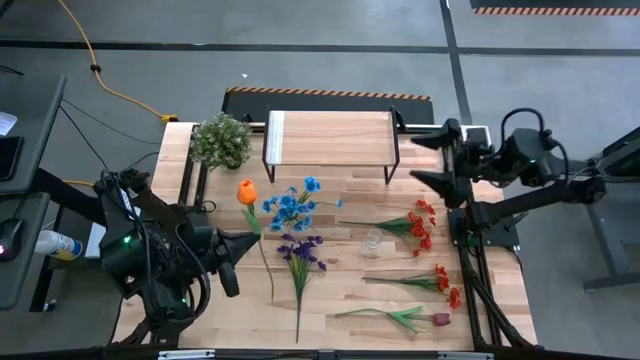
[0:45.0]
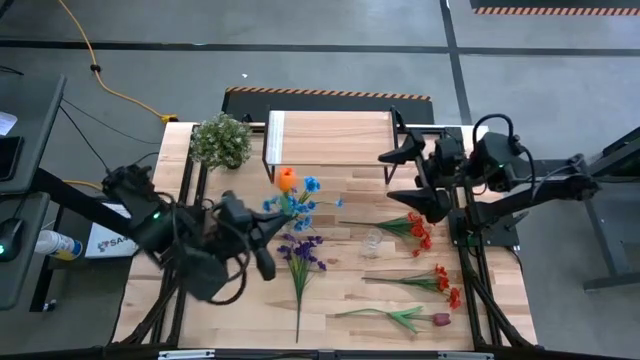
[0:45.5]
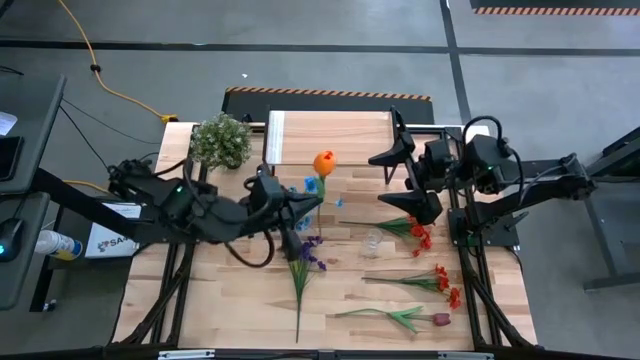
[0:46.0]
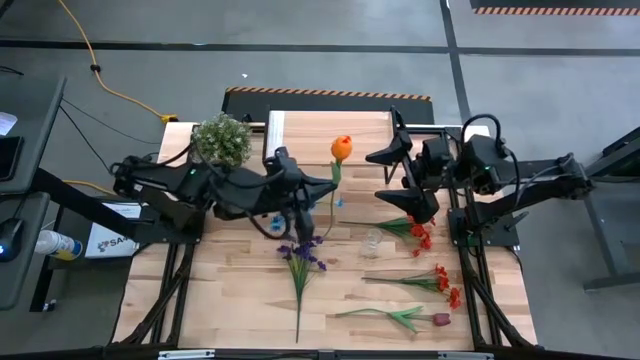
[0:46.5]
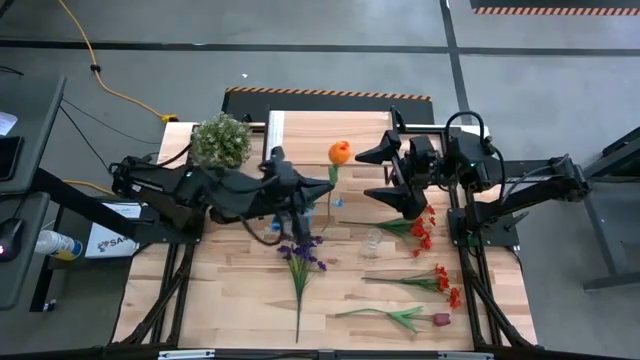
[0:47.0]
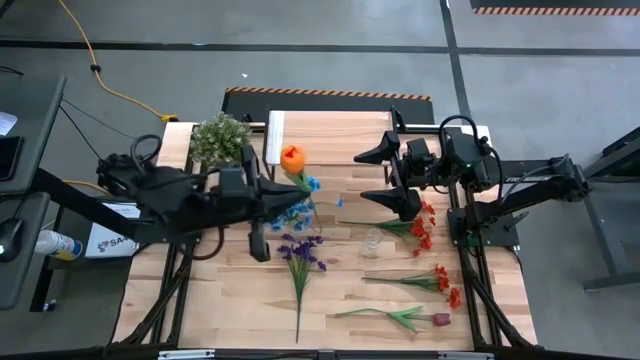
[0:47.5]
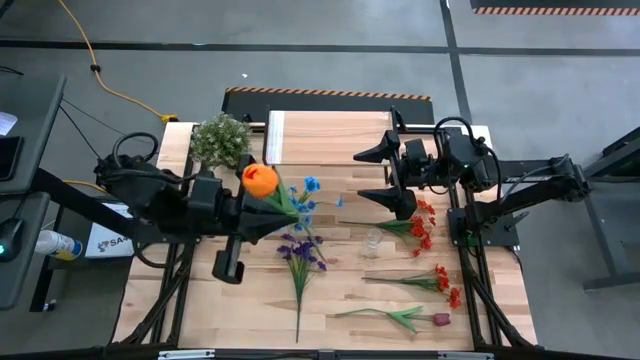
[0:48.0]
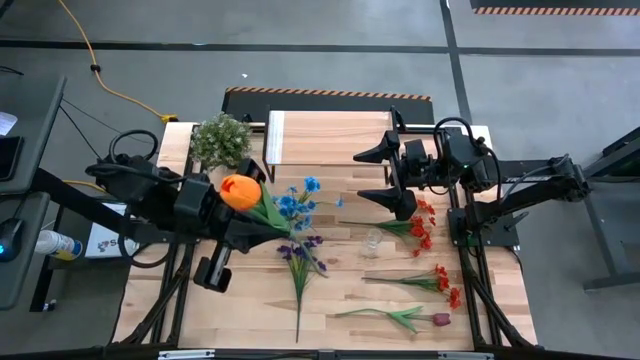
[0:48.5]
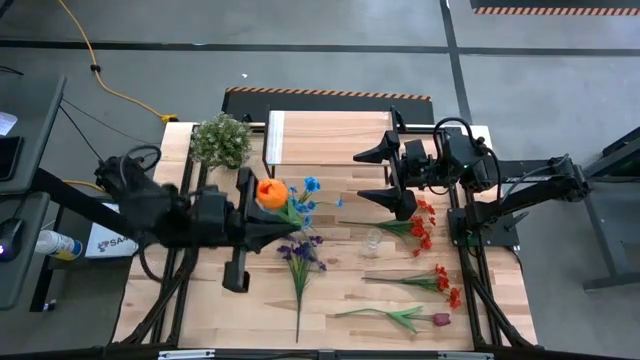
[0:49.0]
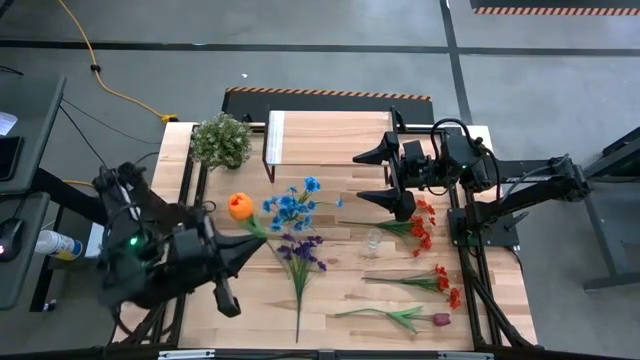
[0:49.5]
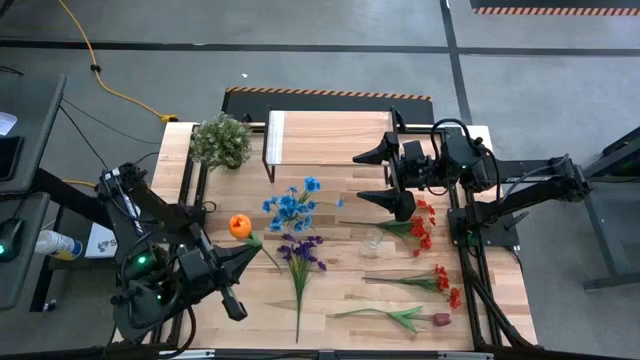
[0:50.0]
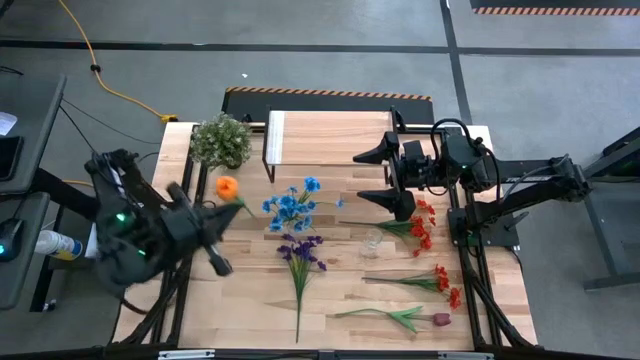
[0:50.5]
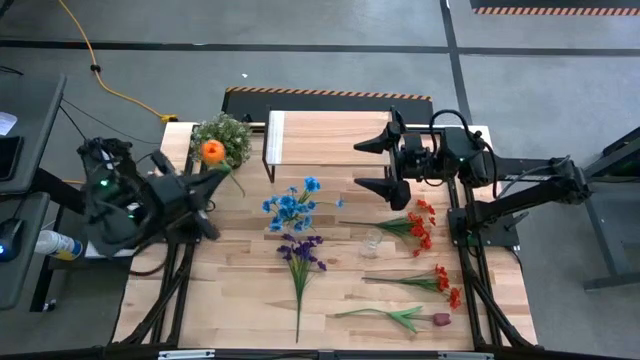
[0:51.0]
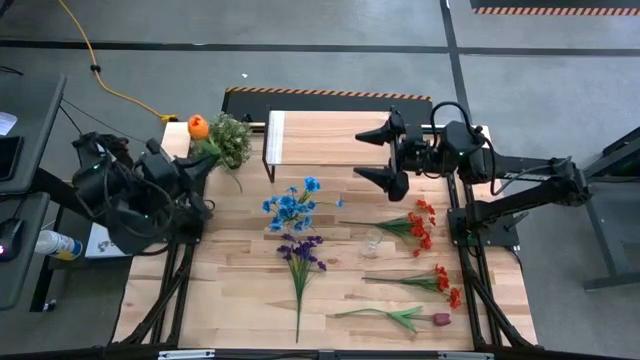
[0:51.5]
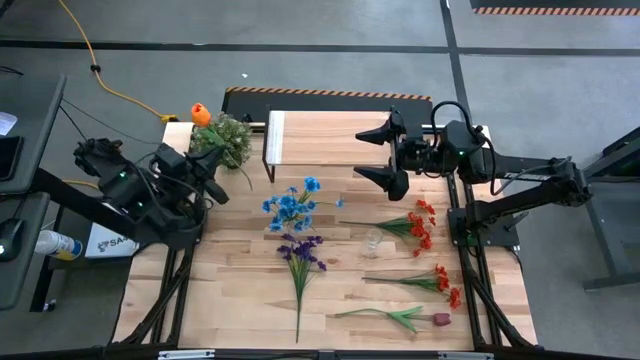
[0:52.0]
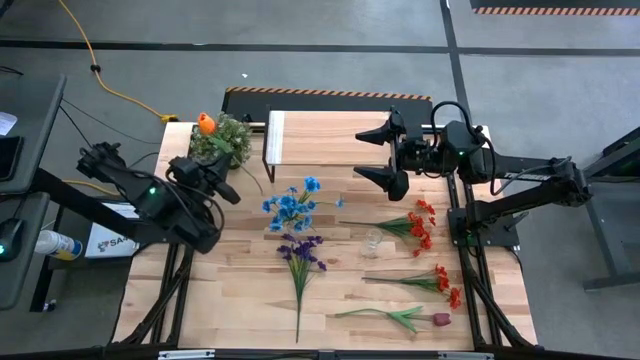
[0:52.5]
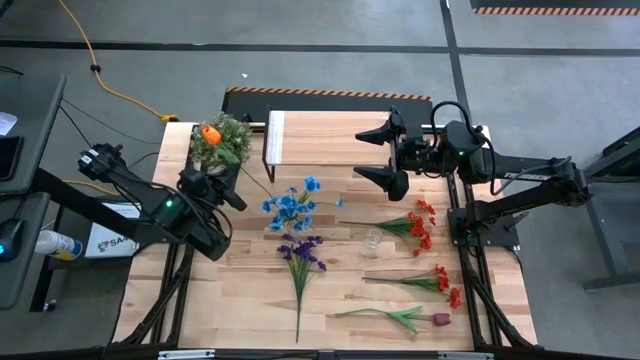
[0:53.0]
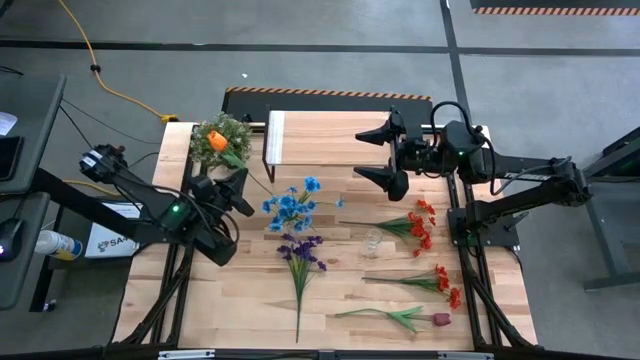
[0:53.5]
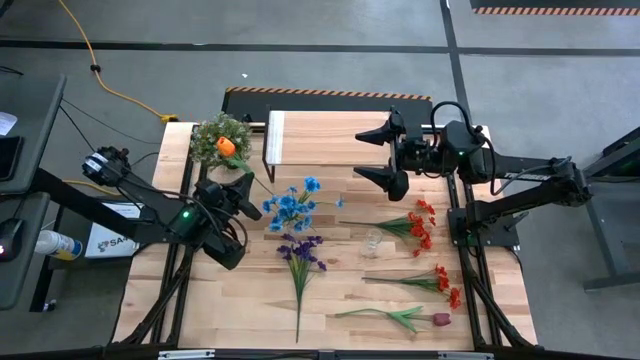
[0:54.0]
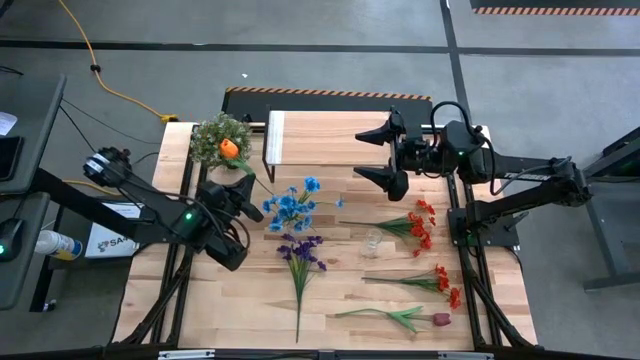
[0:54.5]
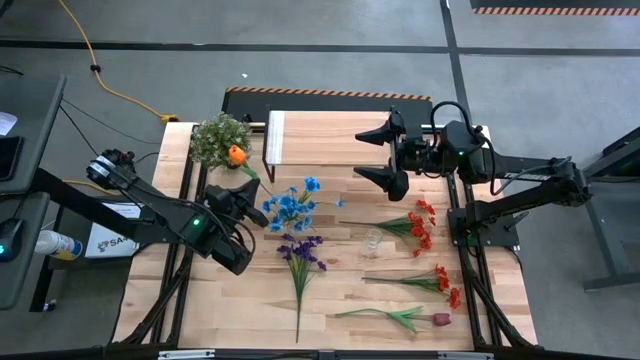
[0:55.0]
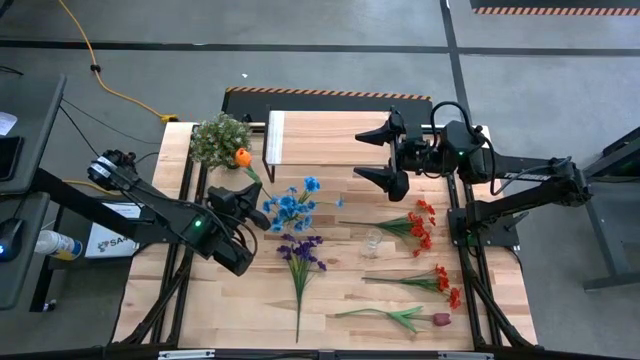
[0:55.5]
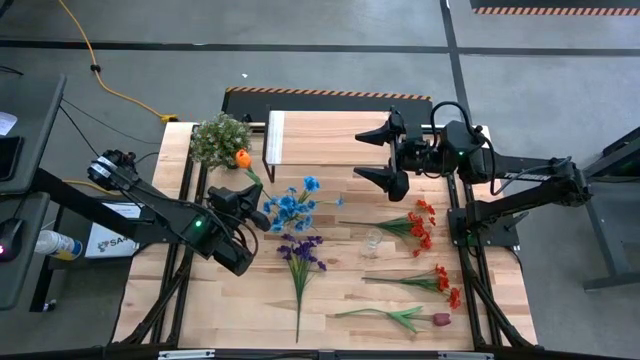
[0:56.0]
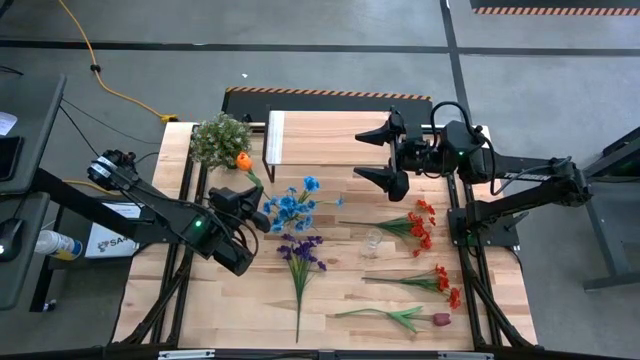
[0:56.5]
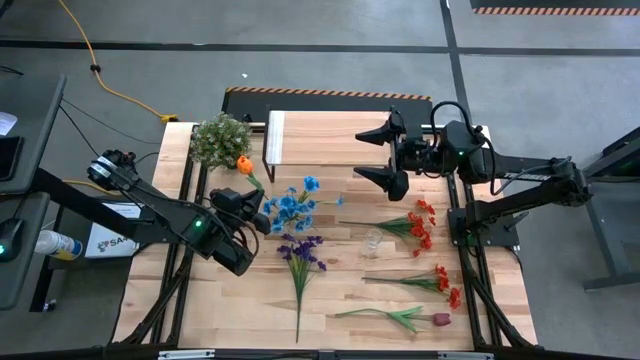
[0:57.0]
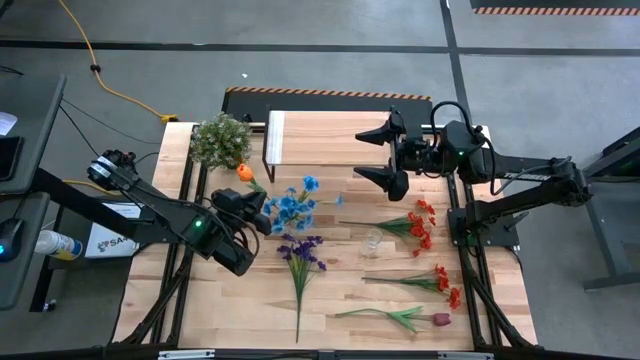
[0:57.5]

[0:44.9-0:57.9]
Task: Pick and place flowers into a vace then onto a shelf
Put the orange flower into the left transparent vase

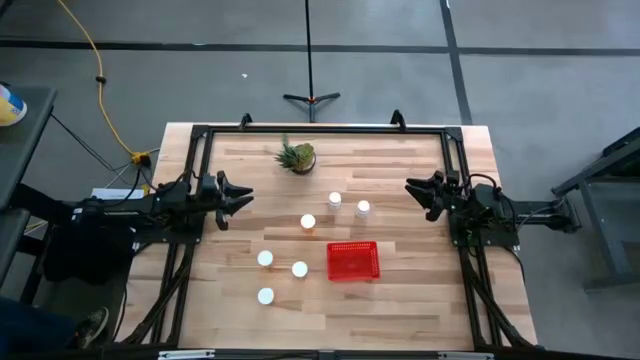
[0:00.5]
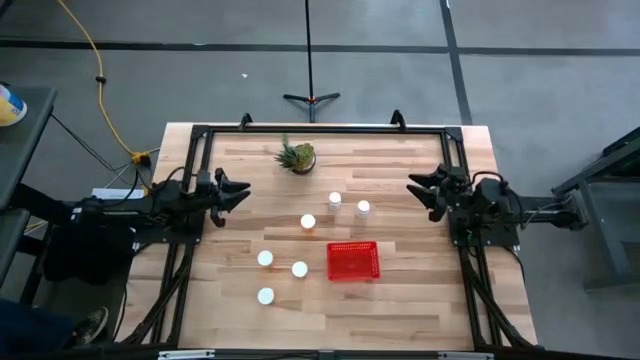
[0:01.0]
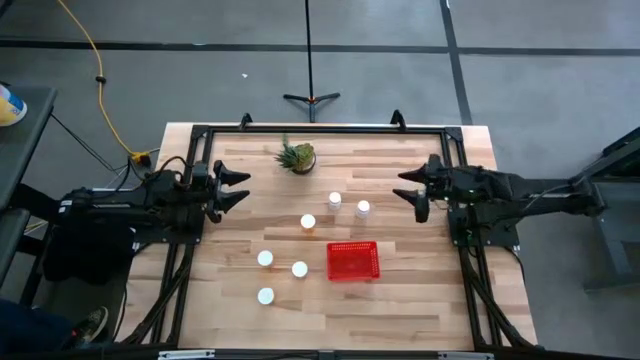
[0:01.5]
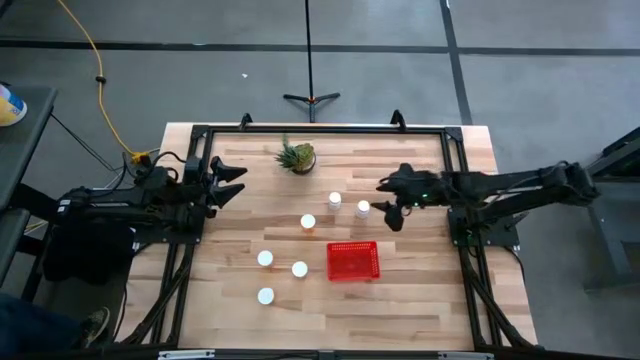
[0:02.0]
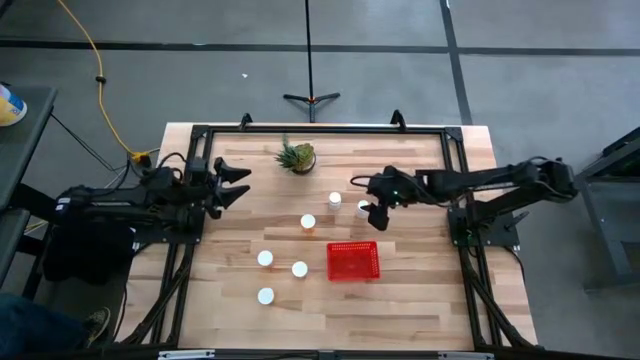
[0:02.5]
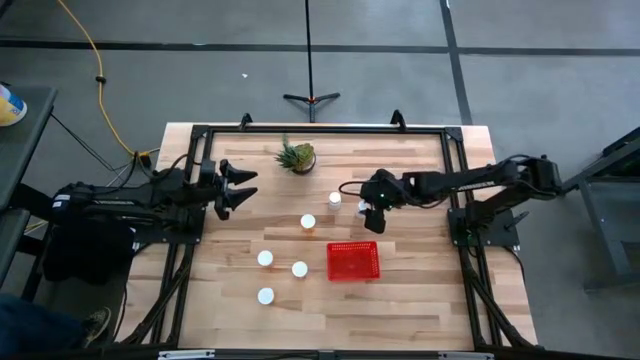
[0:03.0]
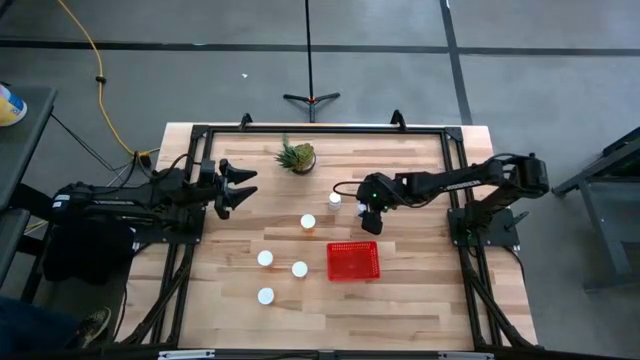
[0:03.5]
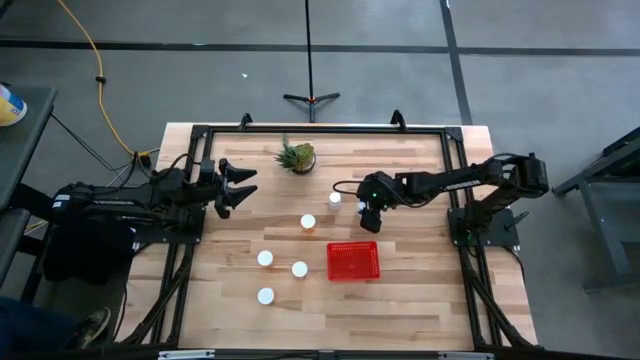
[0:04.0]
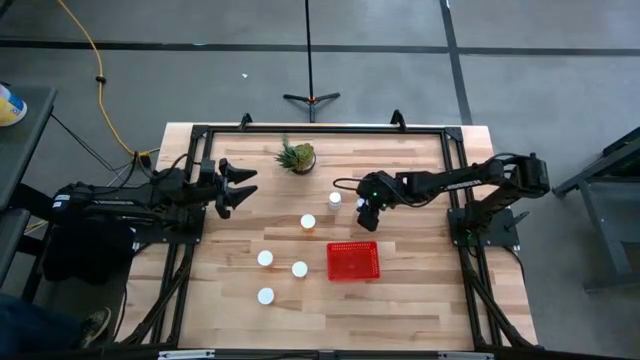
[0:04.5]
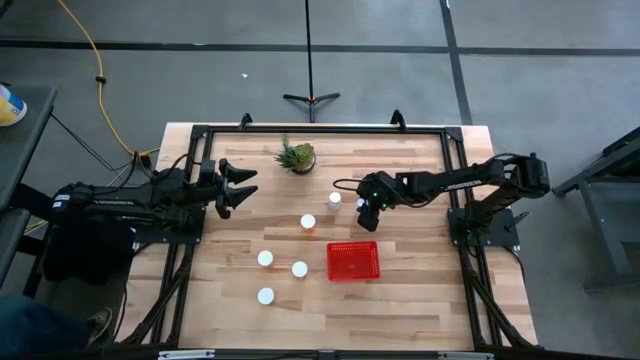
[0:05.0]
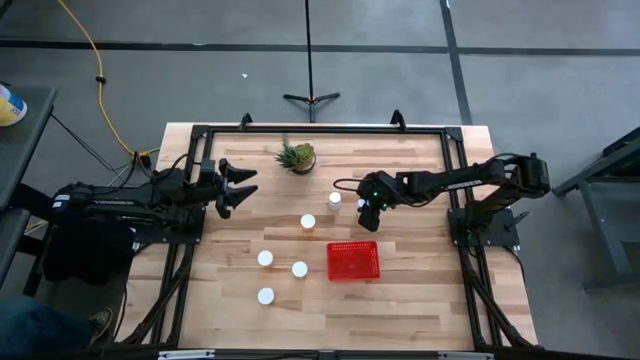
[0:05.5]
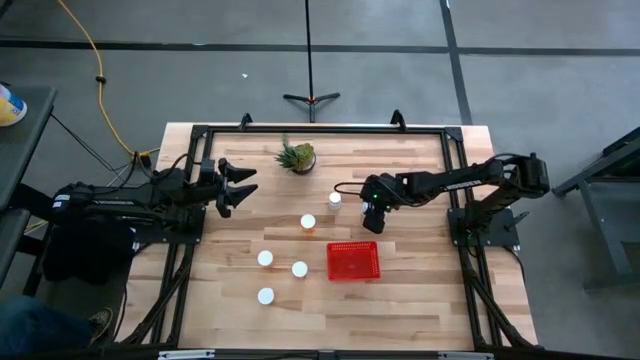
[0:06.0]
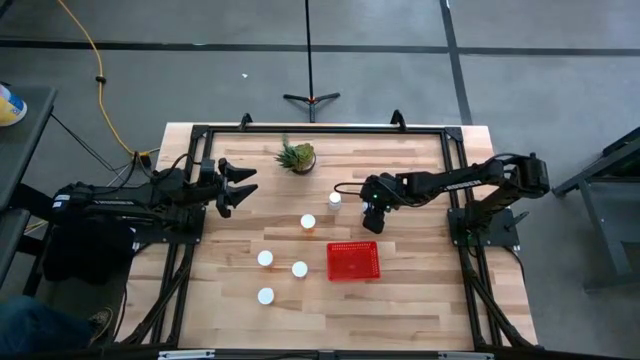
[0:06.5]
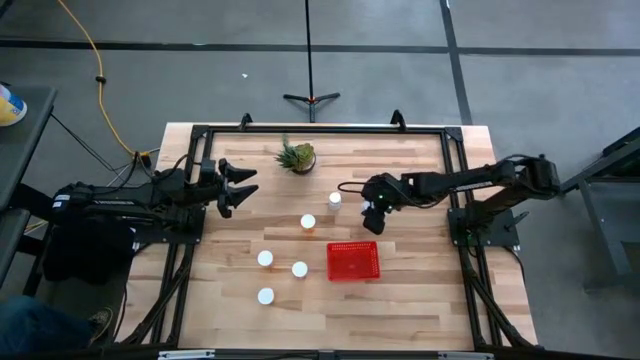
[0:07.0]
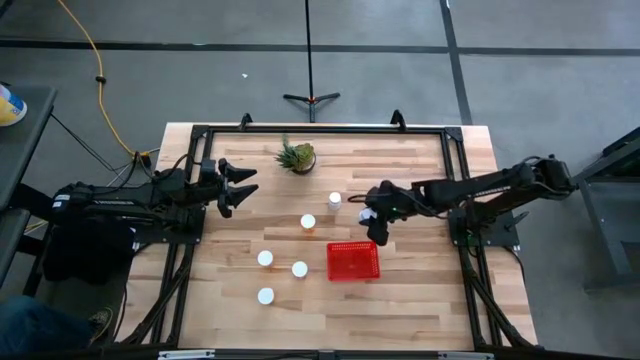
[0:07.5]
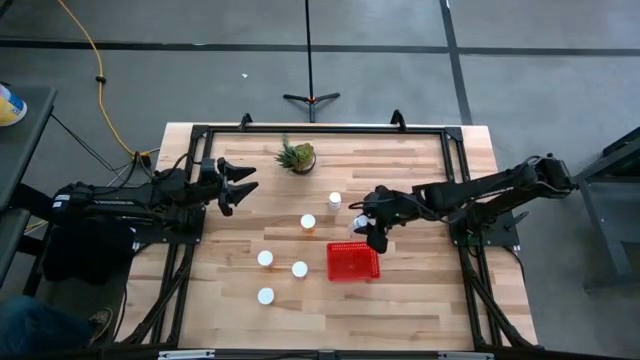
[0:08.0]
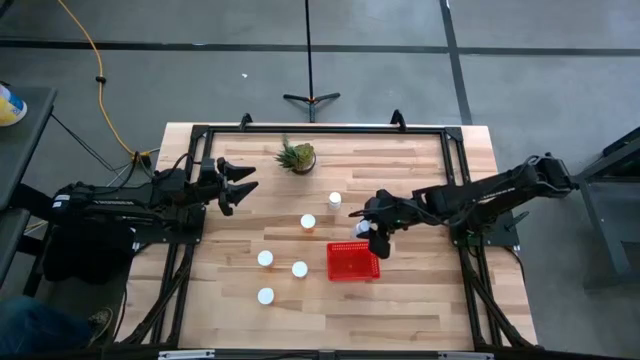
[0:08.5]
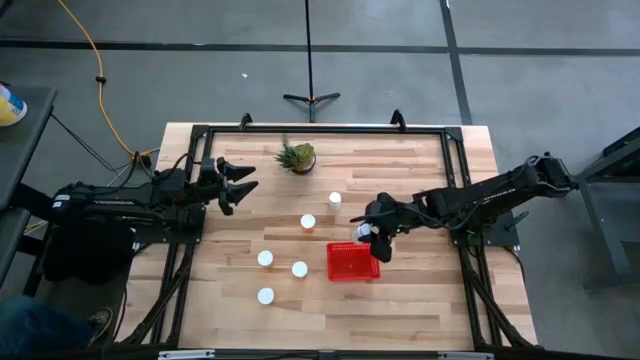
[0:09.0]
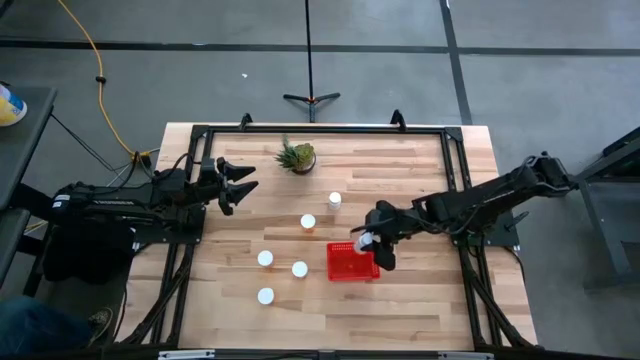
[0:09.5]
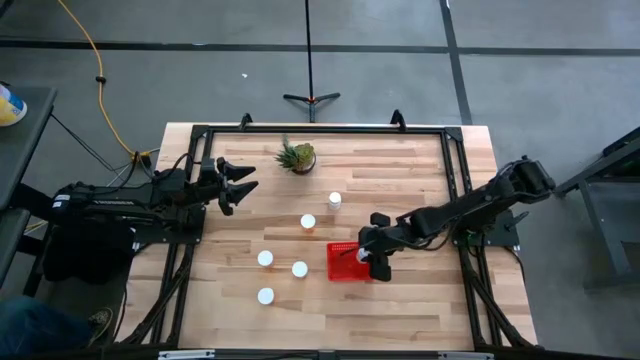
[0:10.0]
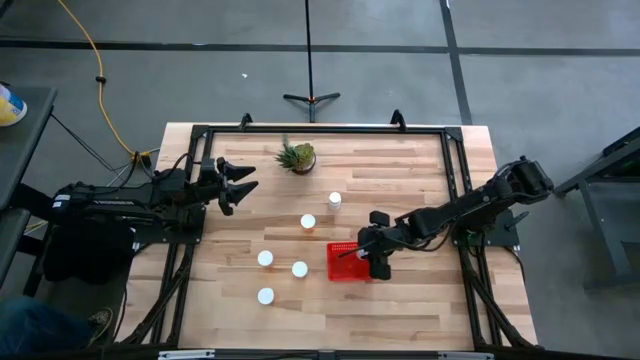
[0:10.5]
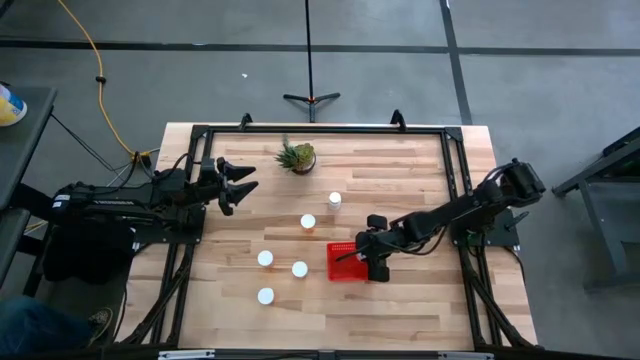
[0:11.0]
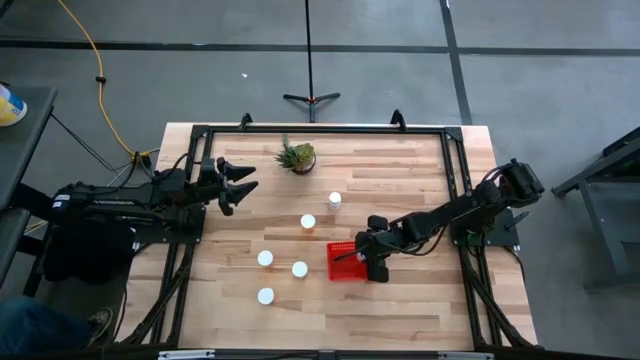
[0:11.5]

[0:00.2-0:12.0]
Task: Pick and place pill bottles into a basket
Put the white pill bottle into the red bin
